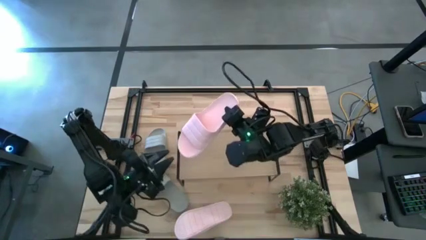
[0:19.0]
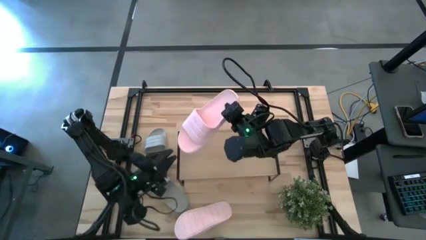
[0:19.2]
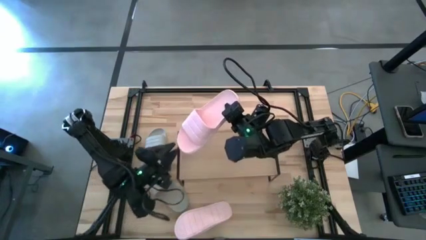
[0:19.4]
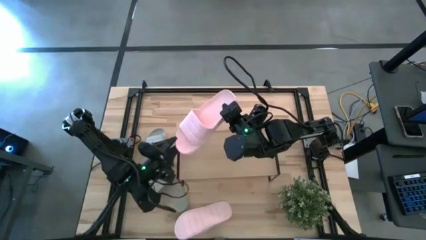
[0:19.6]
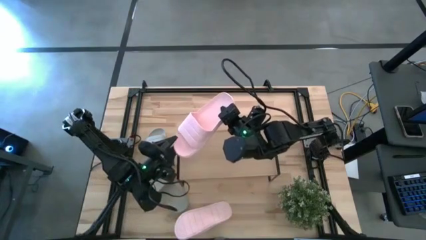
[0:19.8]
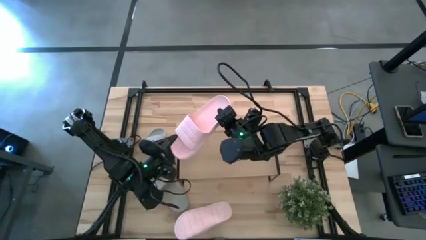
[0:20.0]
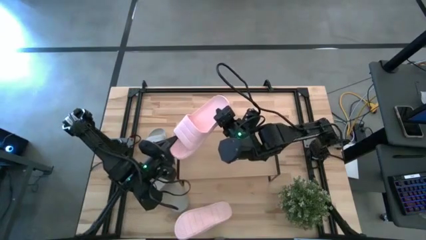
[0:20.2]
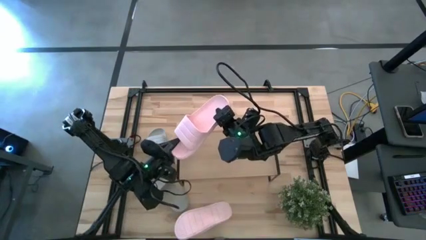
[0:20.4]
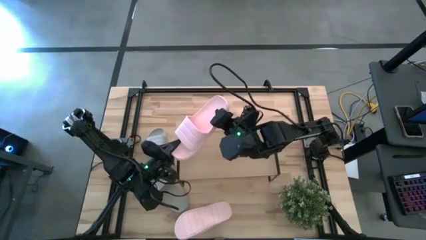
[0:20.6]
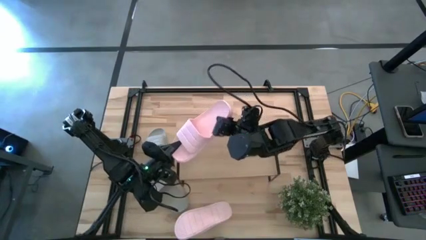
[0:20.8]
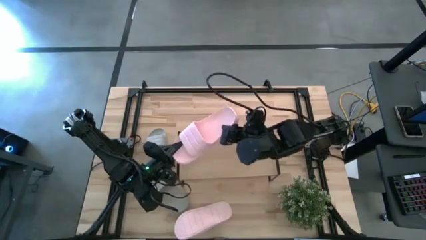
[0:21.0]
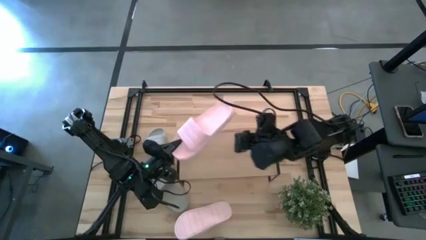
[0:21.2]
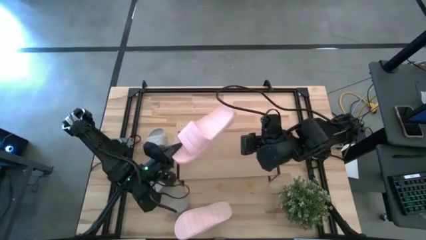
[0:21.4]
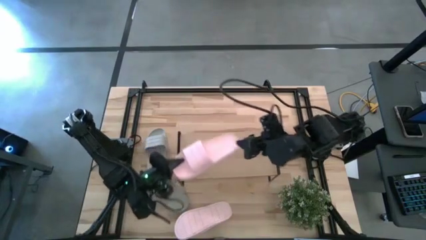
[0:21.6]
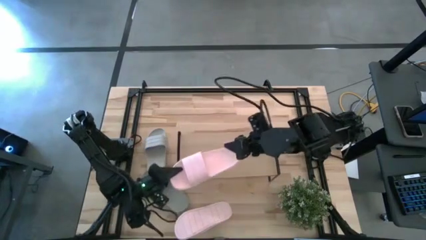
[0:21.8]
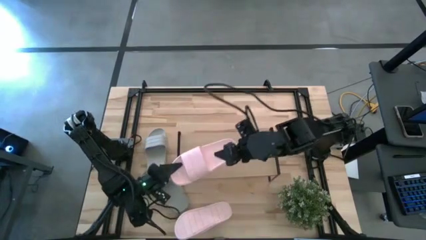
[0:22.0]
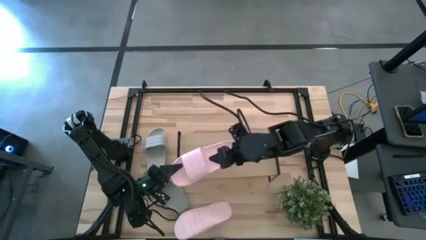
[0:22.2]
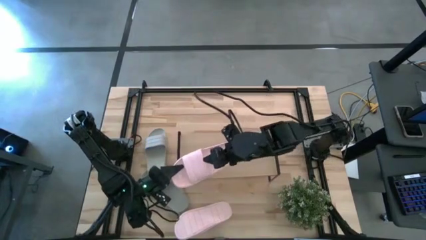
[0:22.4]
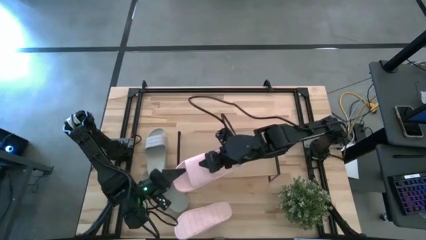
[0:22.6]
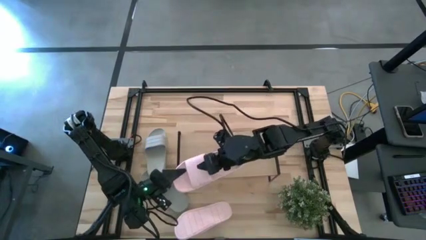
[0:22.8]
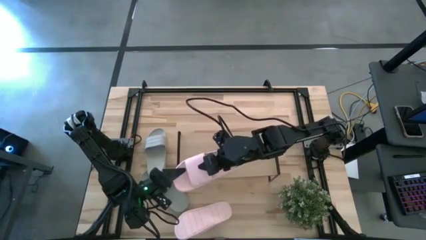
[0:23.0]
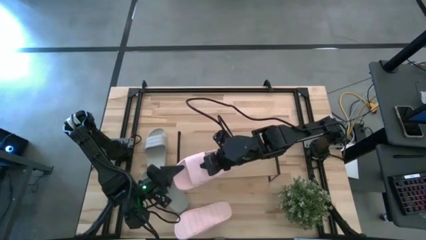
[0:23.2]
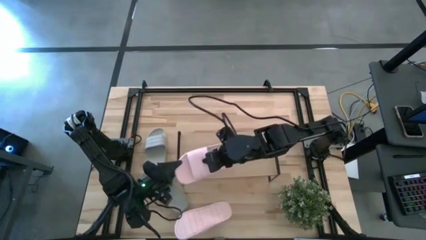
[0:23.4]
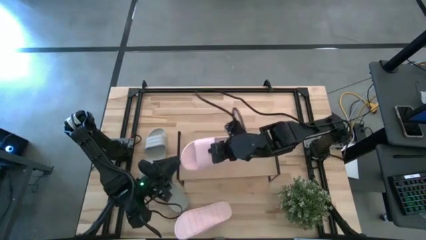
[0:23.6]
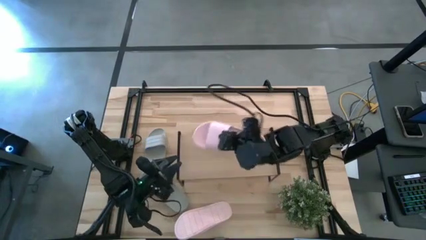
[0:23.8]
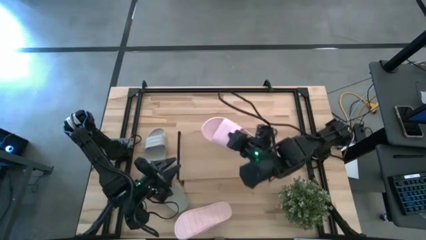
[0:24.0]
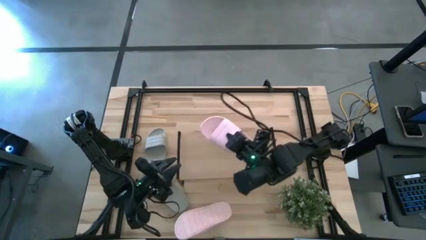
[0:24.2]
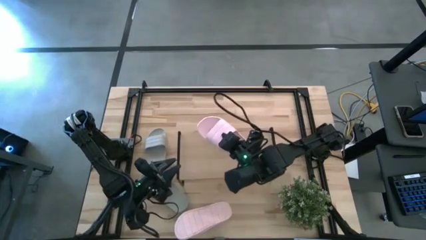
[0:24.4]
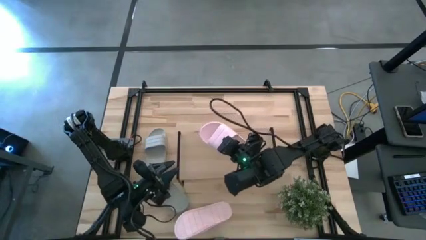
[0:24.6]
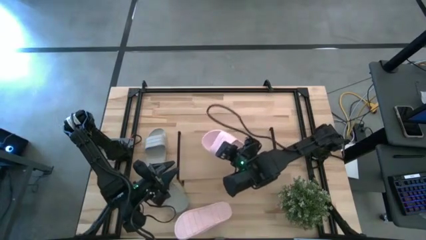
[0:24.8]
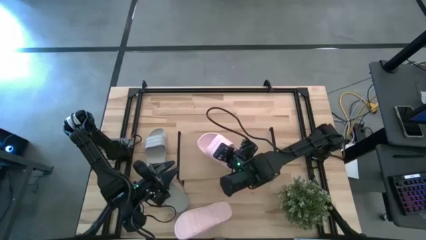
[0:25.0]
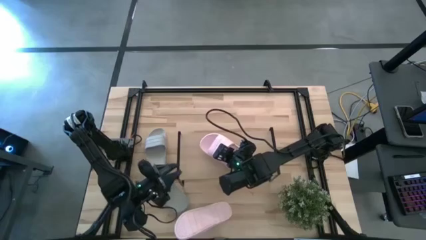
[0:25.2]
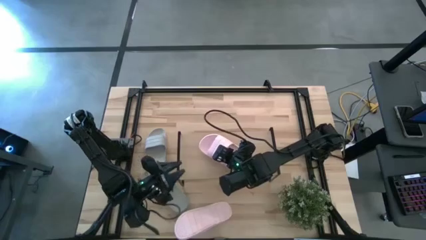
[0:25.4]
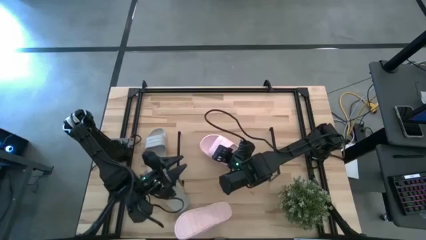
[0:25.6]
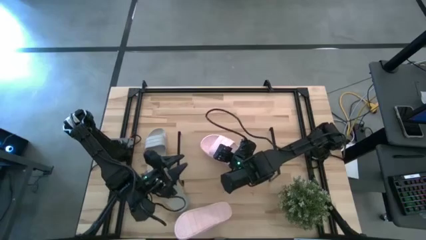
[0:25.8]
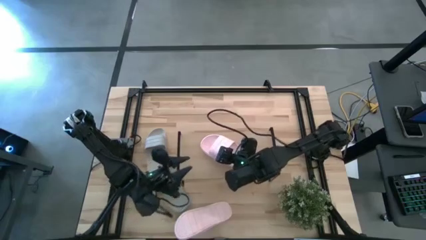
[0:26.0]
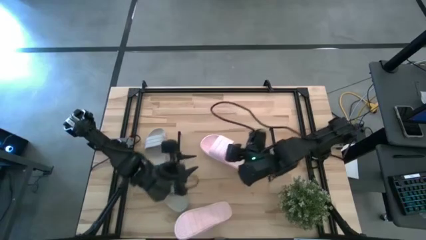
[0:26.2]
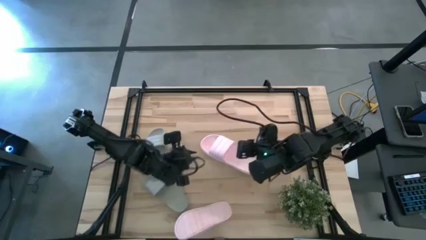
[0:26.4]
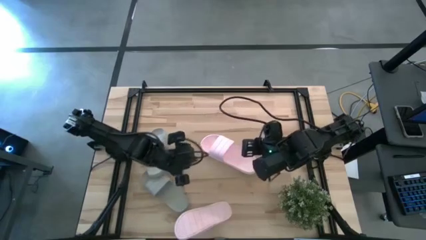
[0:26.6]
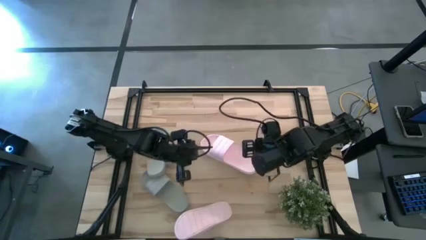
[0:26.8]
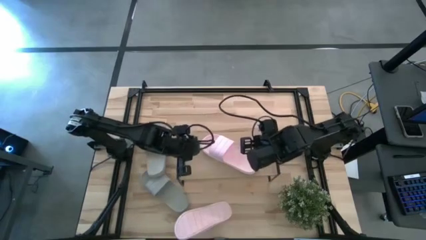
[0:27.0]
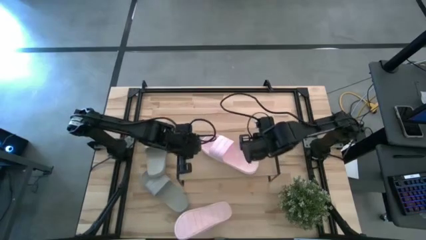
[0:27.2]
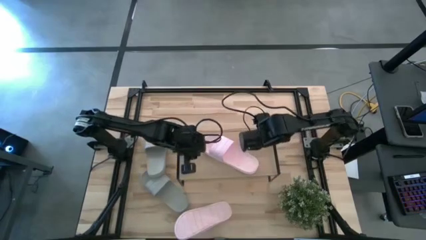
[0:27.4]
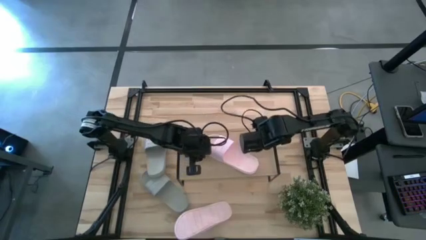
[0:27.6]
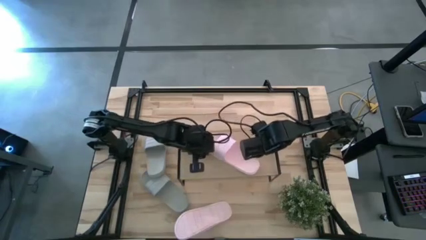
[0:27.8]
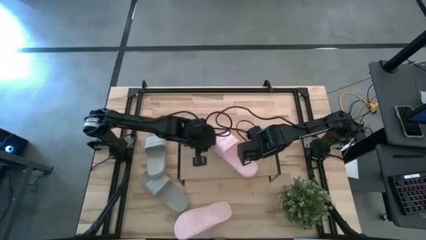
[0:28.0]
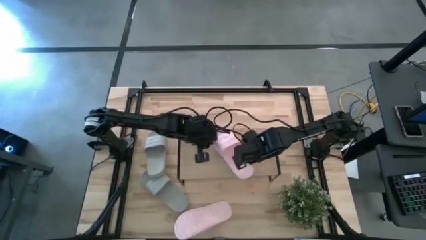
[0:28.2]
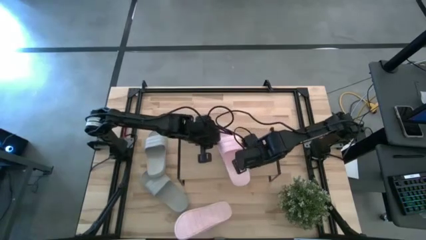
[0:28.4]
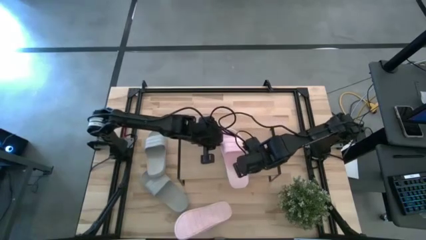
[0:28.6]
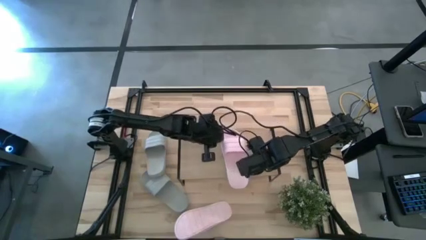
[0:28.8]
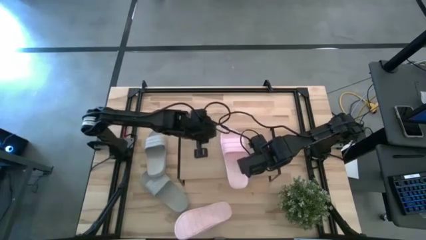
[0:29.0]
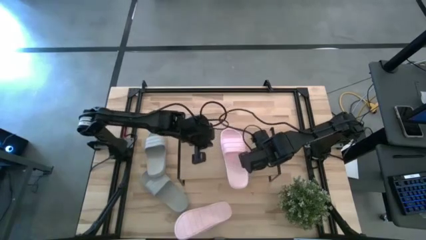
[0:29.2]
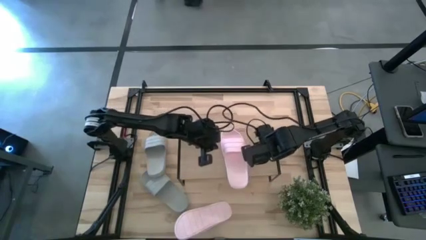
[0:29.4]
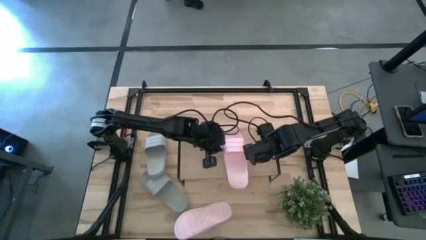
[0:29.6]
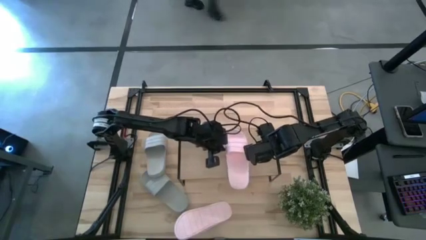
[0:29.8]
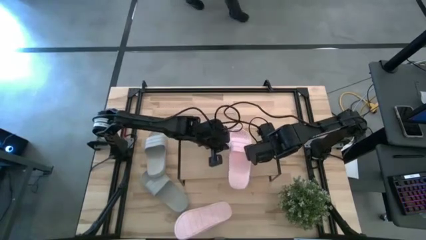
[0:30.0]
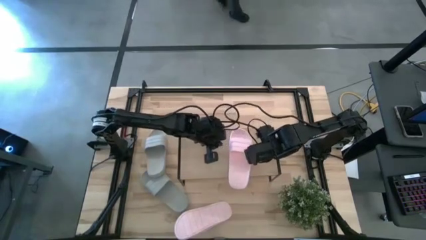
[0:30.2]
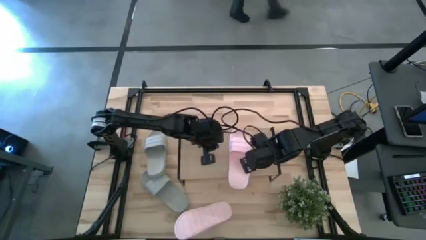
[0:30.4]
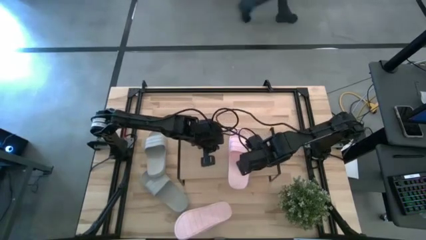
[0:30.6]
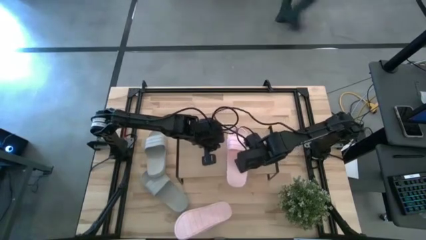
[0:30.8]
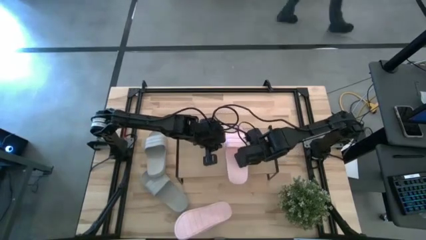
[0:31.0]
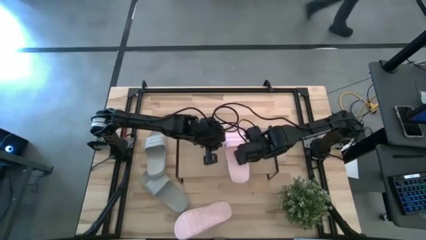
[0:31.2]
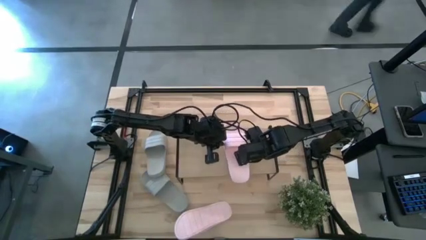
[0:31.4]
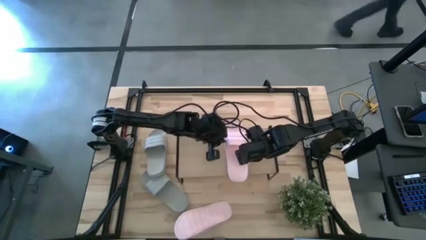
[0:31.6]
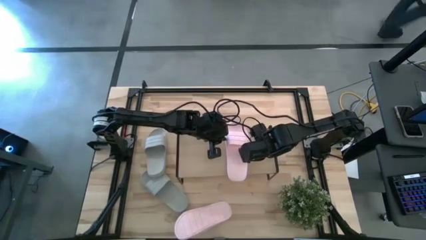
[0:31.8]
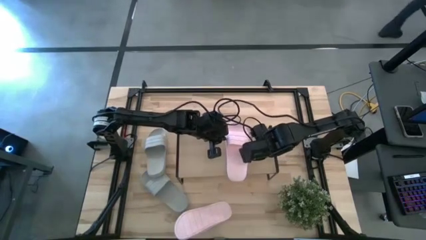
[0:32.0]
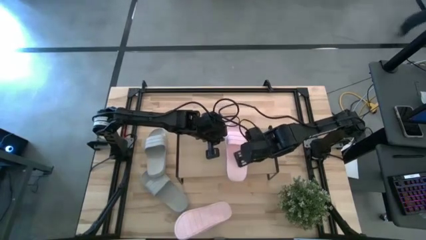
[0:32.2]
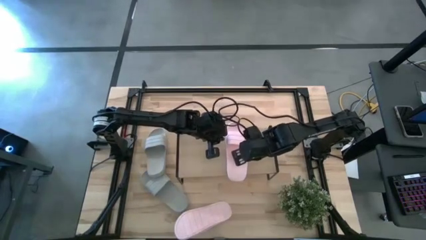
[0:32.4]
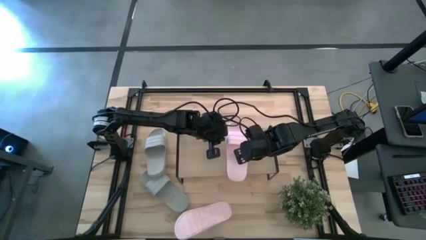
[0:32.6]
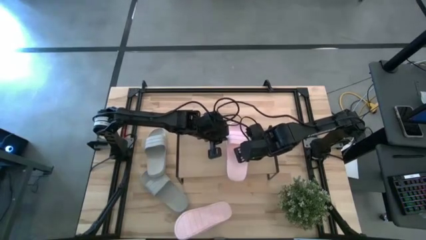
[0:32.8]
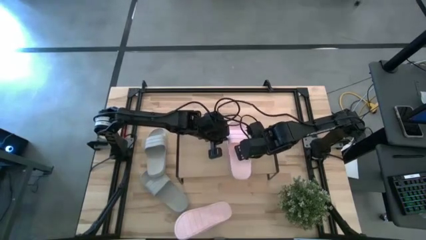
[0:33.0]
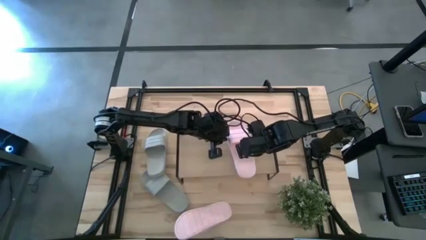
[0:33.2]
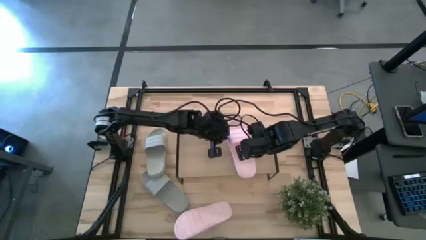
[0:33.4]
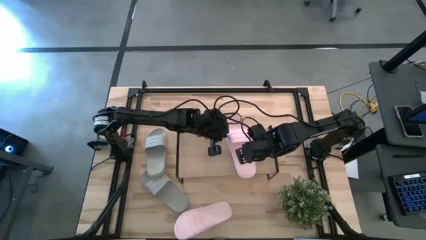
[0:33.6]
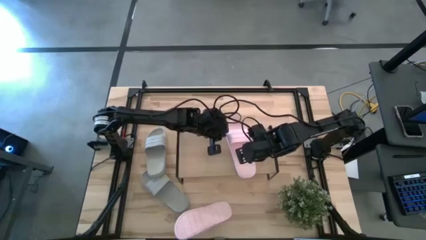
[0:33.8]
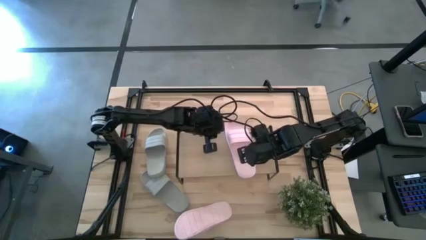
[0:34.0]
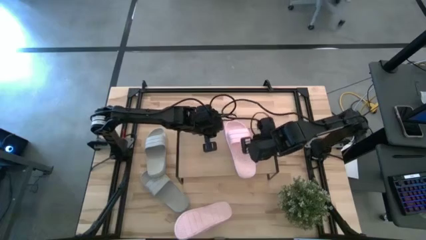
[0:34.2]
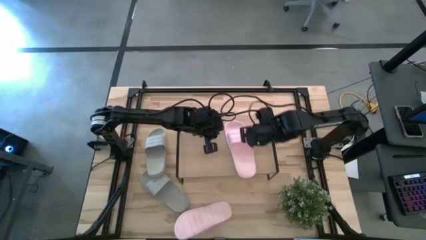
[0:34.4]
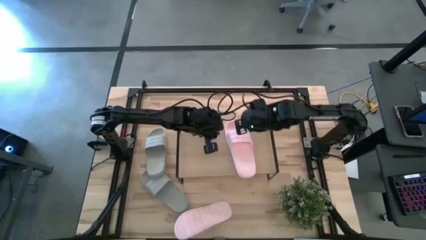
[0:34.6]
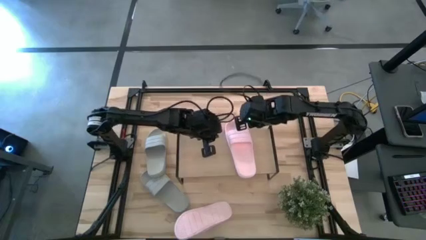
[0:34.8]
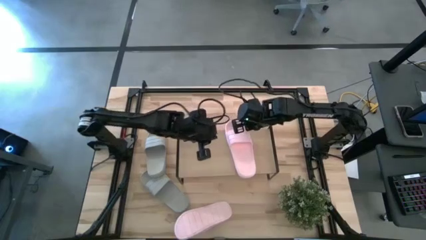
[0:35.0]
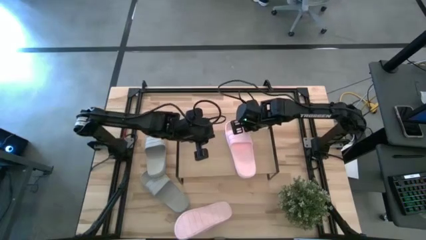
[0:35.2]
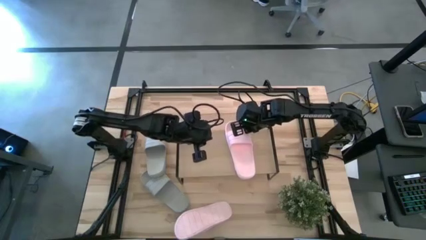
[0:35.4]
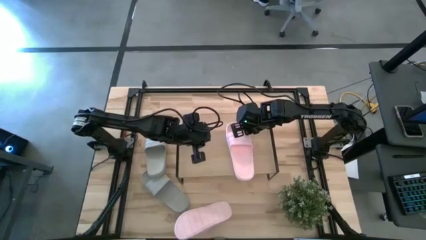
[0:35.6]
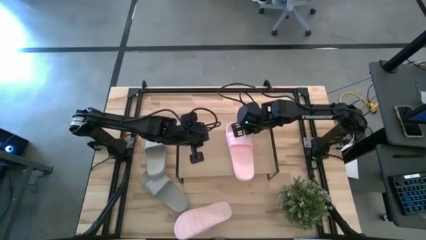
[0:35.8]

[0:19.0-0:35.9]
Task: Pick and place slides into the shelf
Put the right pink slide on the shelf
